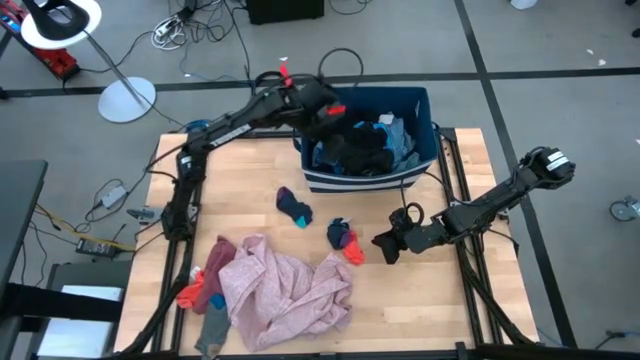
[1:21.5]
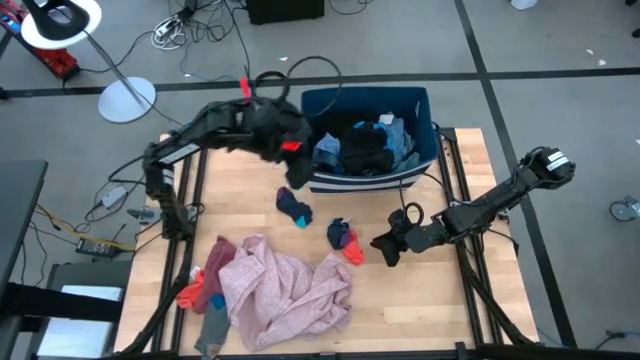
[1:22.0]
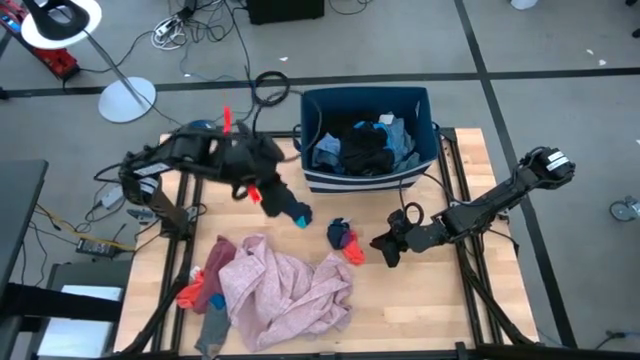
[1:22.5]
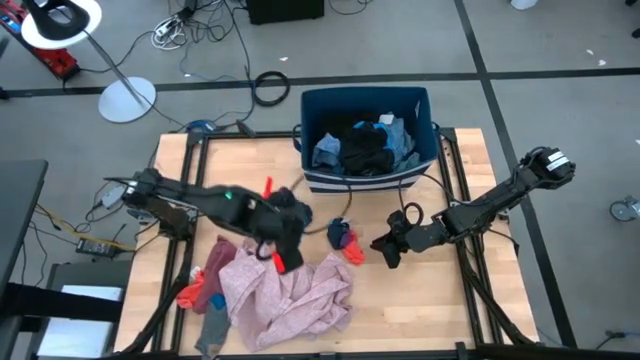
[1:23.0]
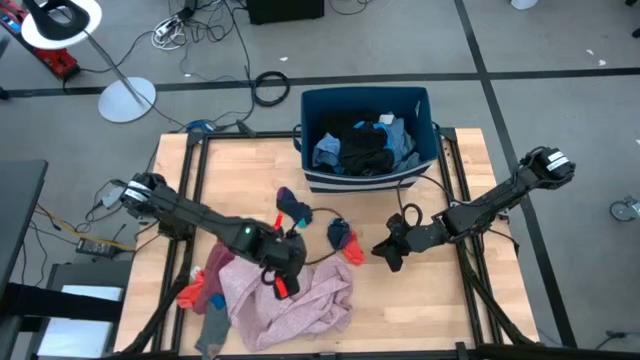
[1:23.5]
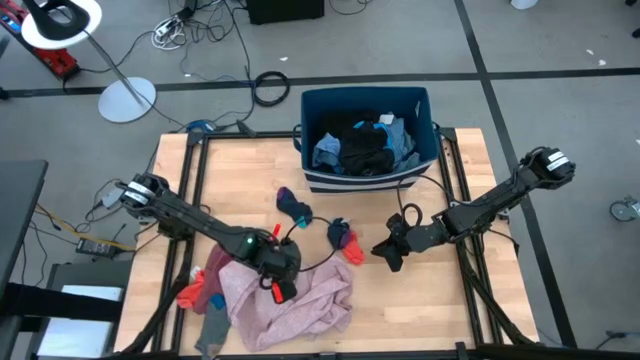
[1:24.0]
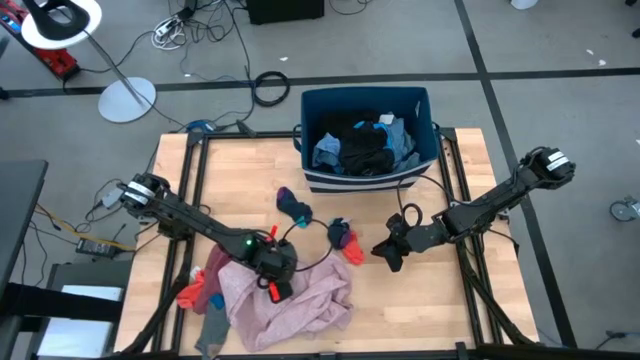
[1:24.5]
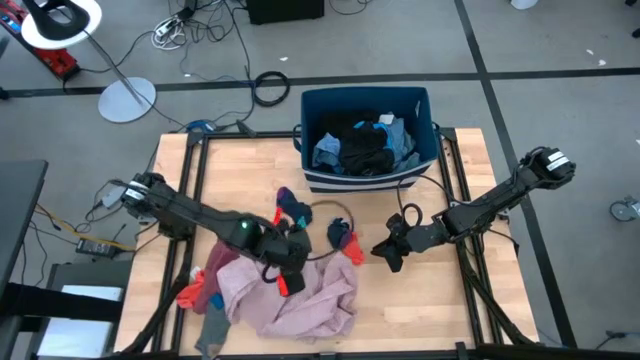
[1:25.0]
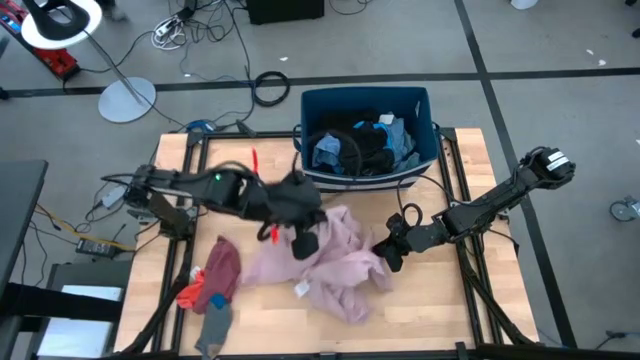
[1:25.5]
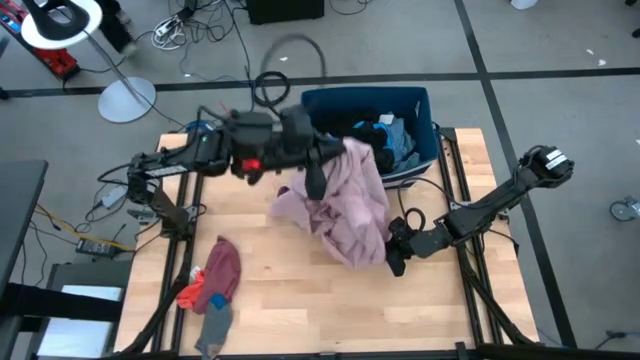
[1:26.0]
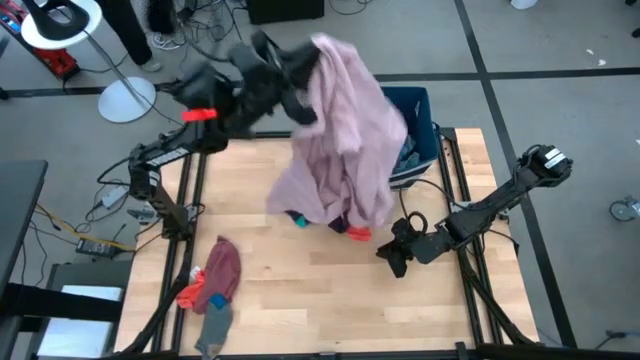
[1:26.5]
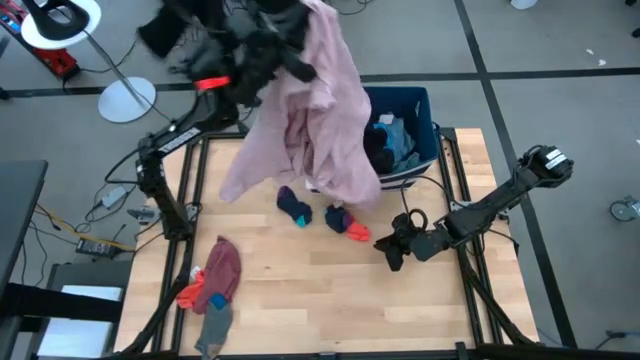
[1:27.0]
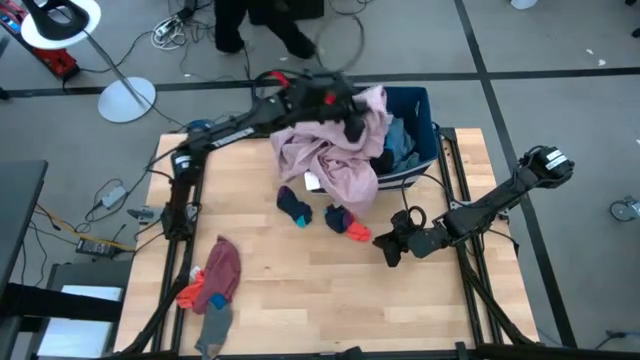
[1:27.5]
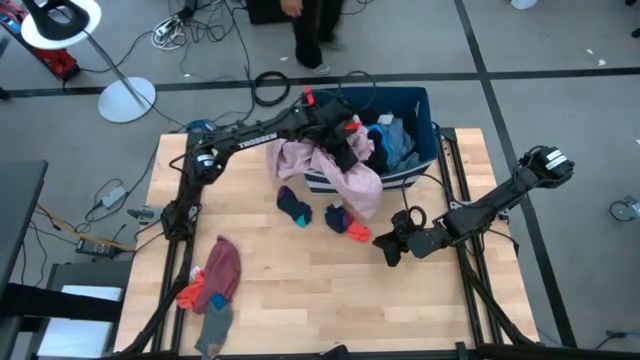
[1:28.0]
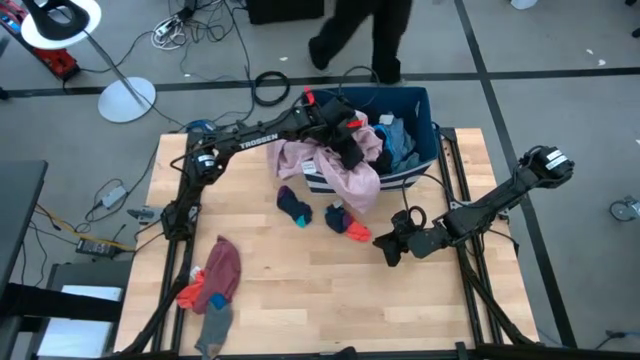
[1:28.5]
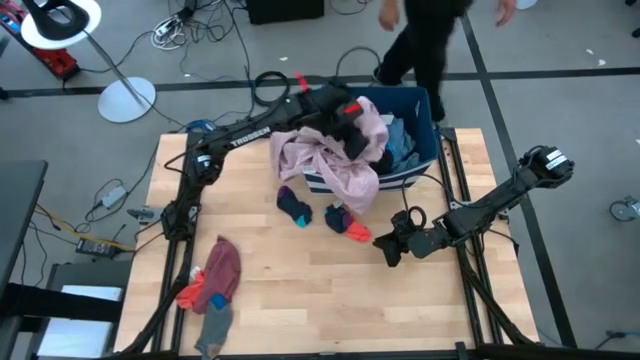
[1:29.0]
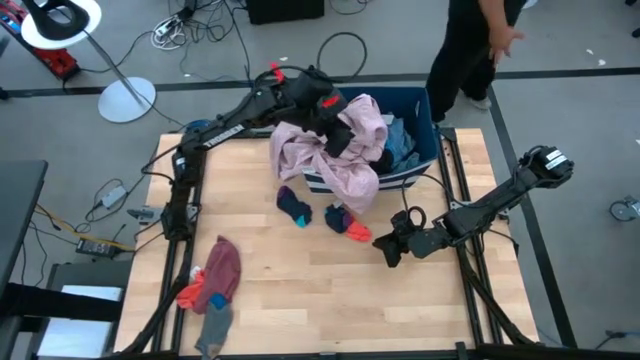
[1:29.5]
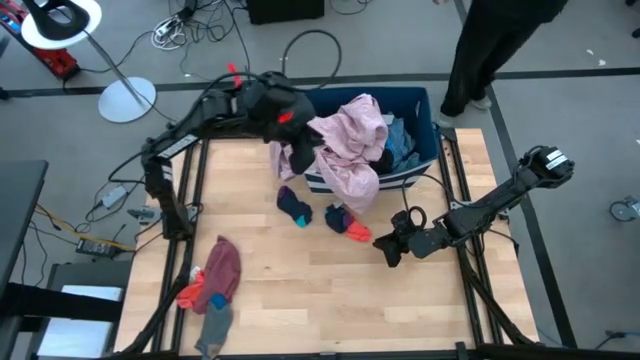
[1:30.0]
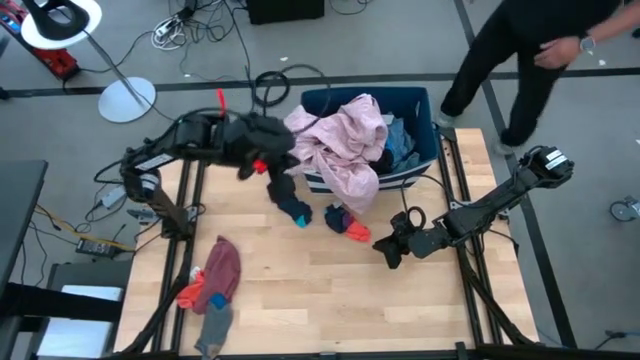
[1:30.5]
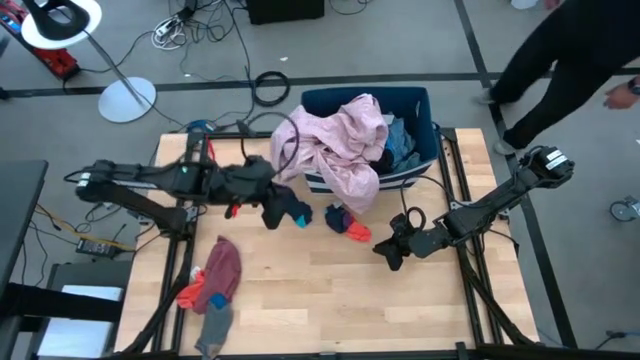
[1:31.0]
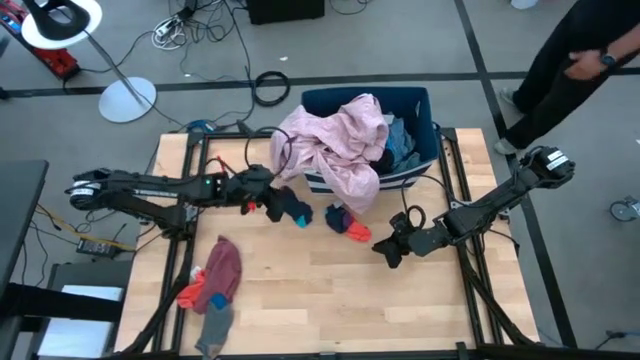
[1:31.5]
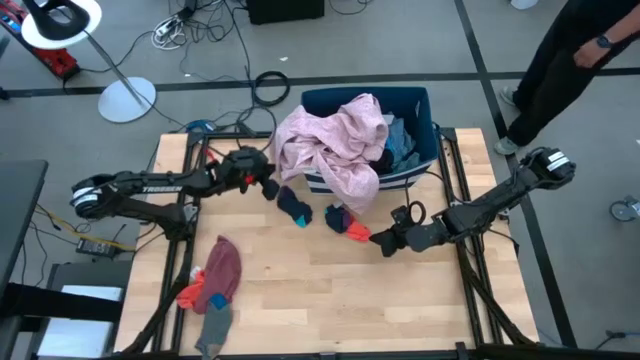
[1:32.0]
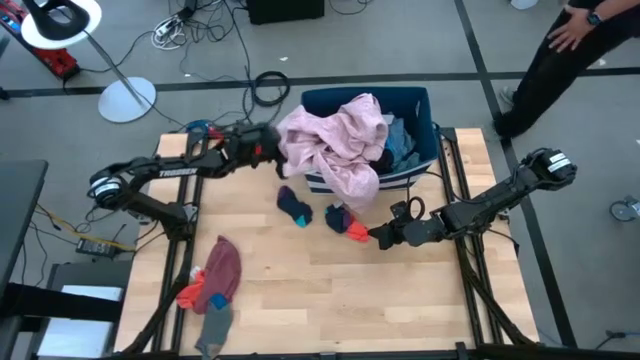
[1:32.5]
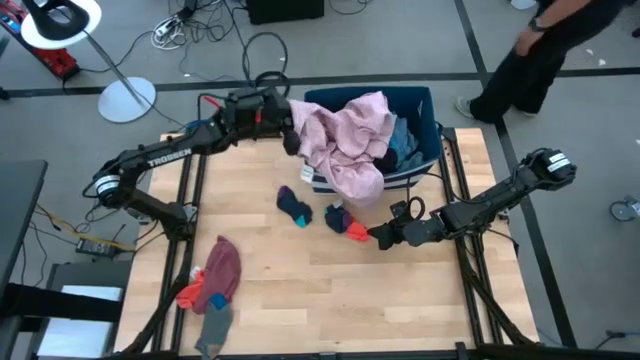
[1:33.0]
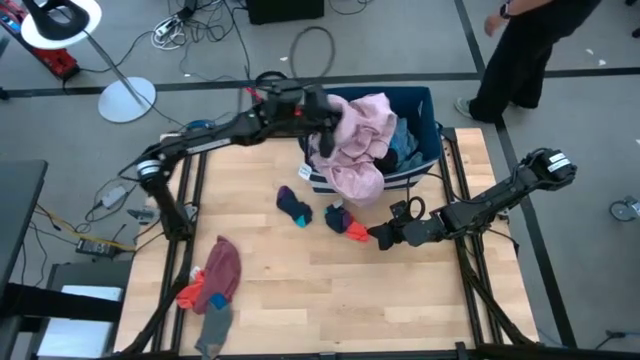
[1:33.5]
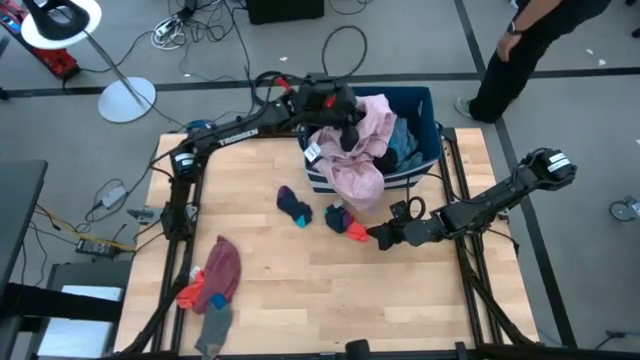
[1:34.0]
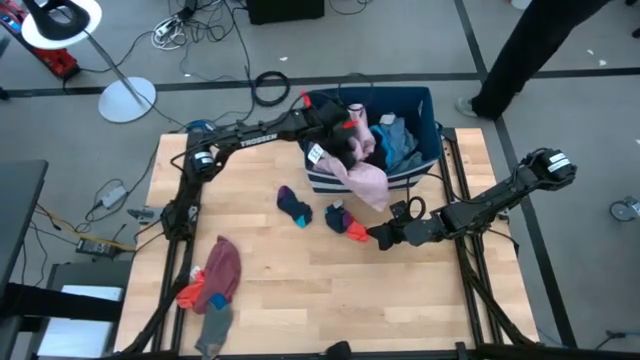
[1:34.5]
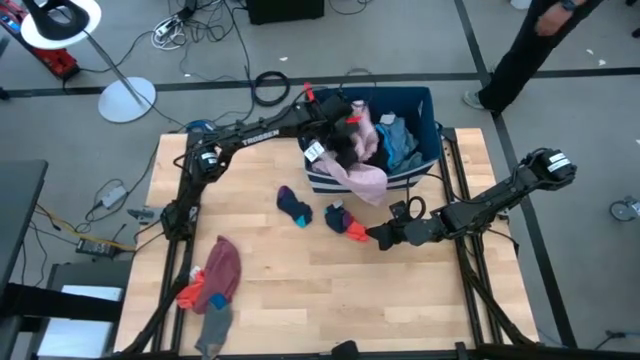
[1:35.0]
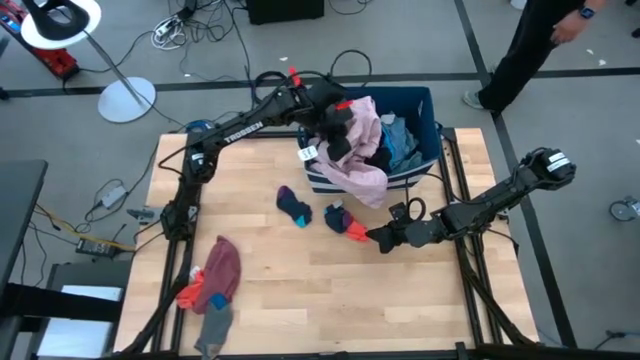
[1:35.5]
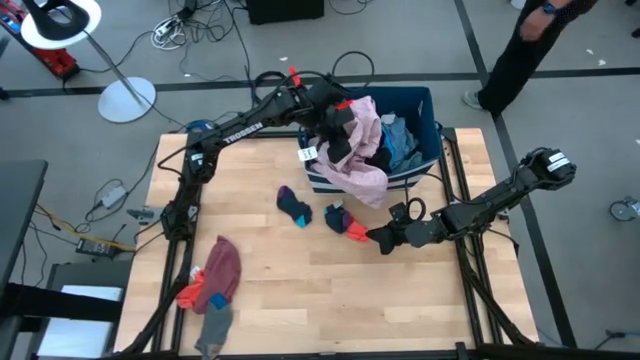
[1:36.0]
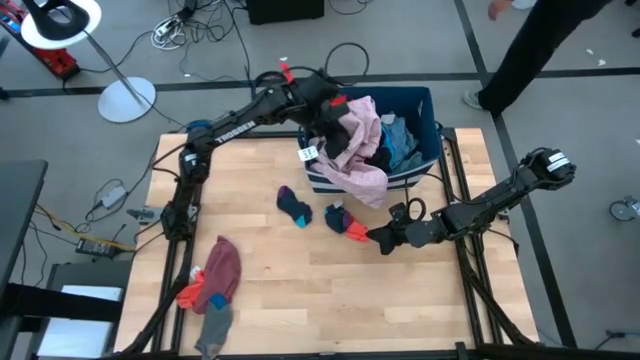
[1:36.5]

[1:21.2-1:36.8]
Task: Sort clothes
Put the pink polo shirt into the blue bin

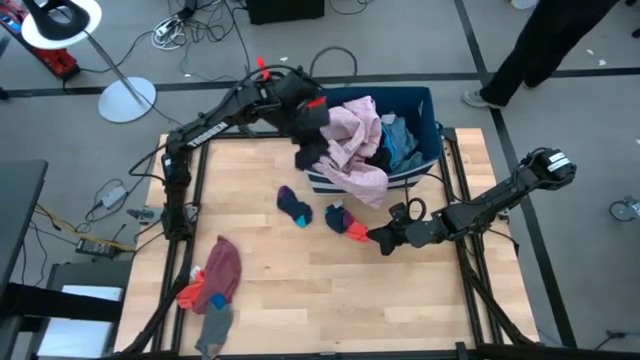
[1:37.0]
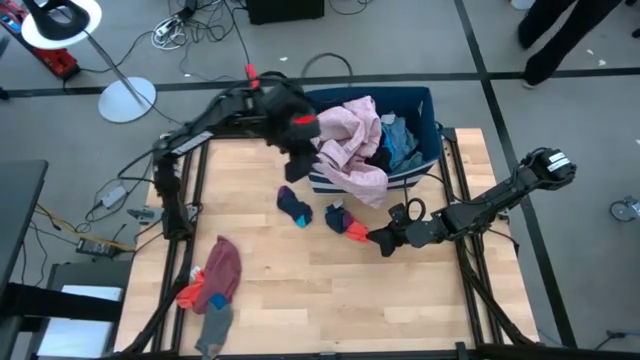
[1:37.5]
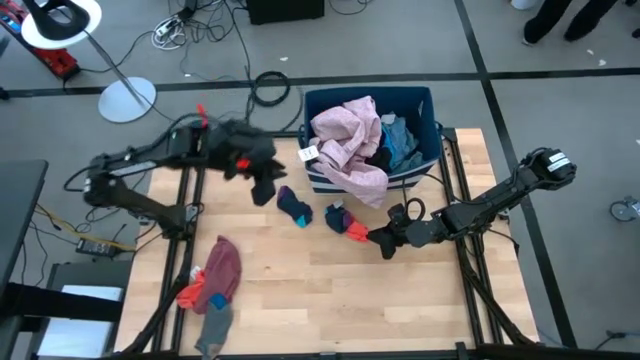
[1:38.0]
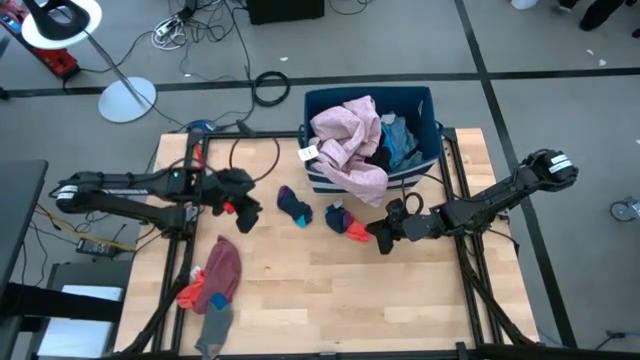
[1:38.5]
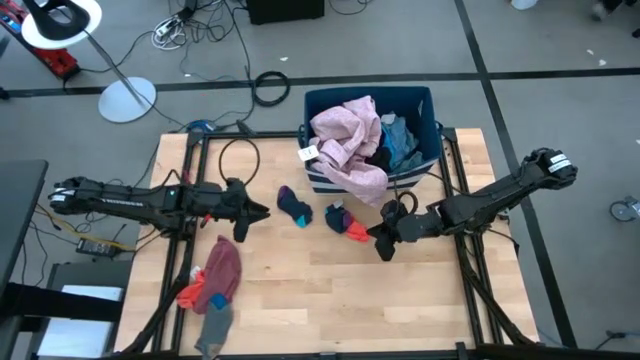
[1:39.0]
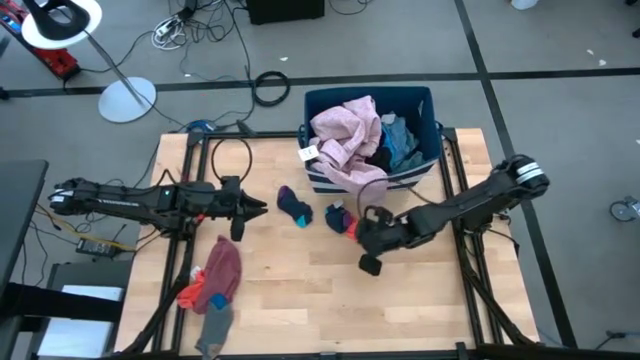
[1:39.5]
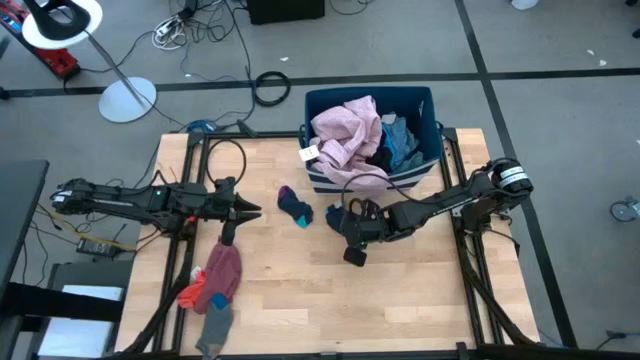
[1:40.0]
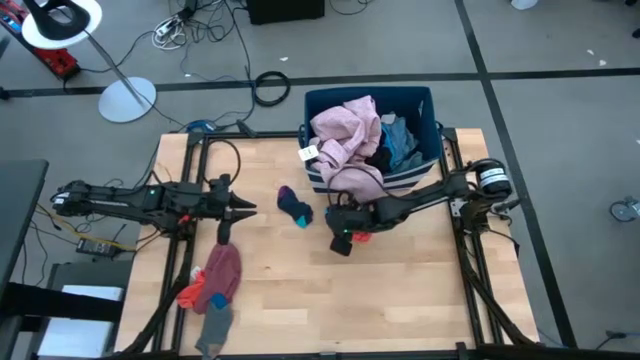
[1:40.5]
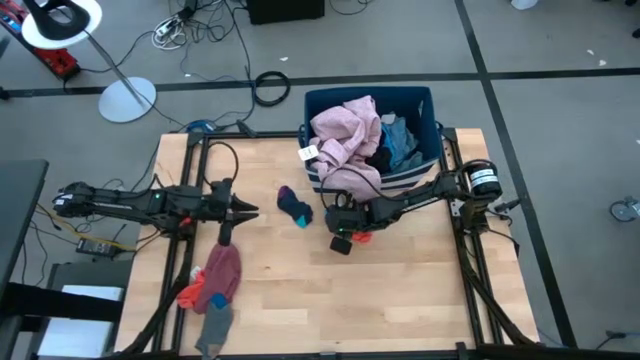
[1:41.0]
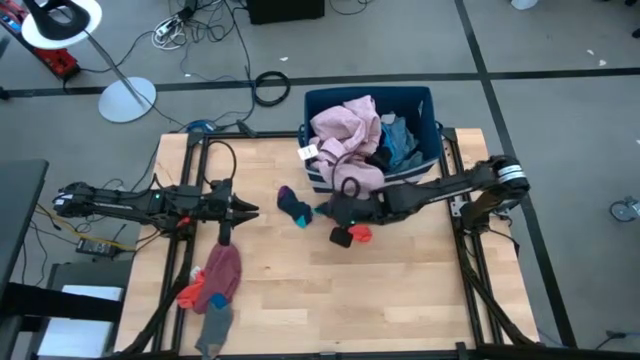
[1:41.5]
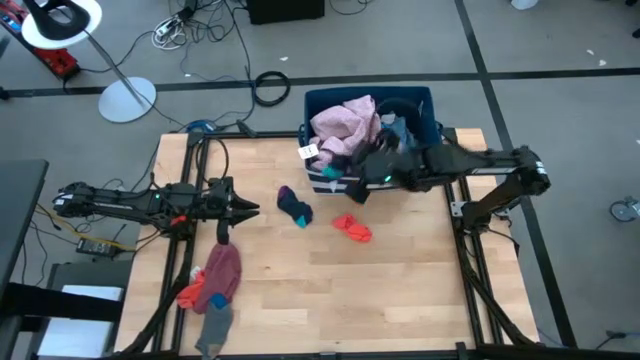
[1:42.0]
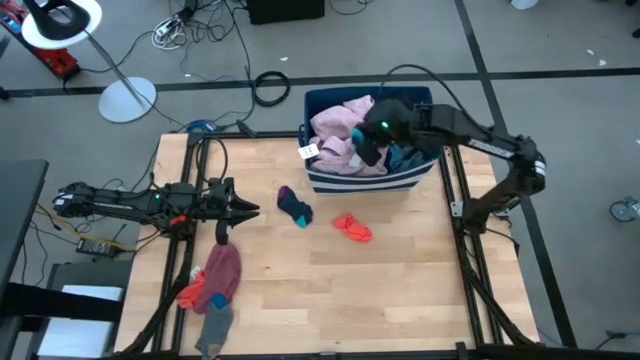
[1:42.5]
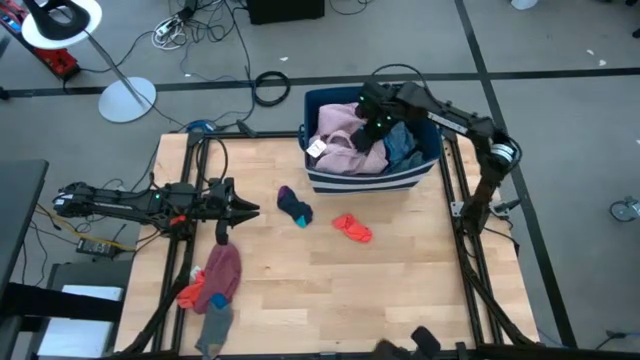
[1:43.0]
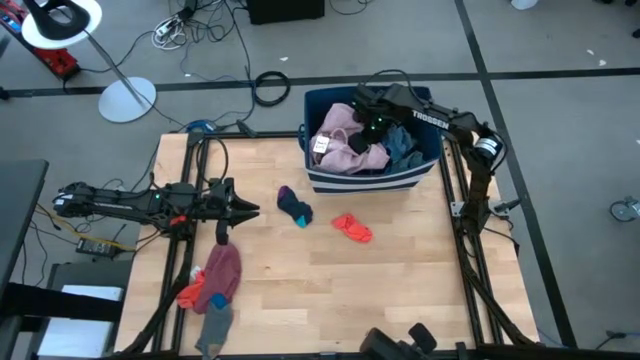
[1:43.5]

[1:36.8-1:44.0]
Put the right dark blue socks into the blue bin
